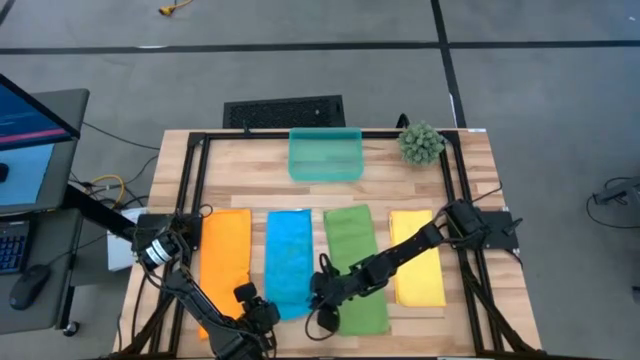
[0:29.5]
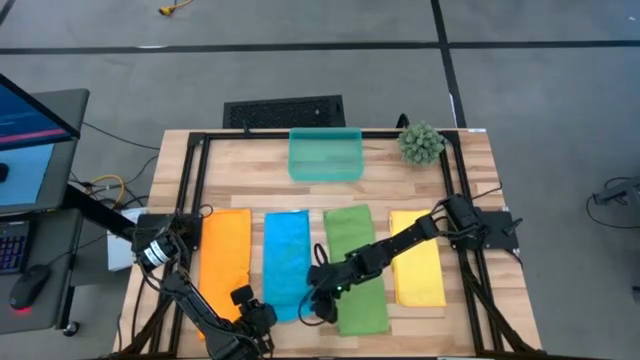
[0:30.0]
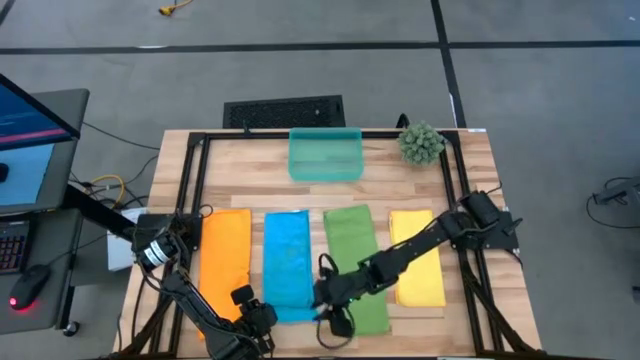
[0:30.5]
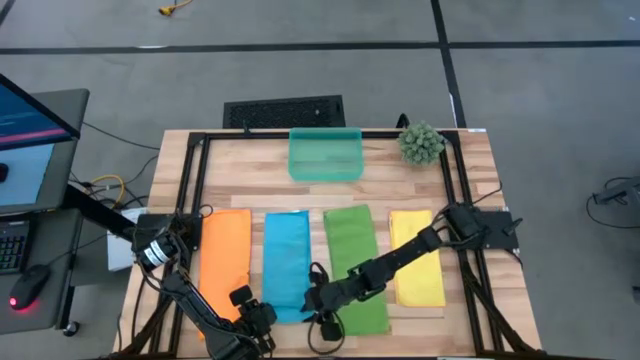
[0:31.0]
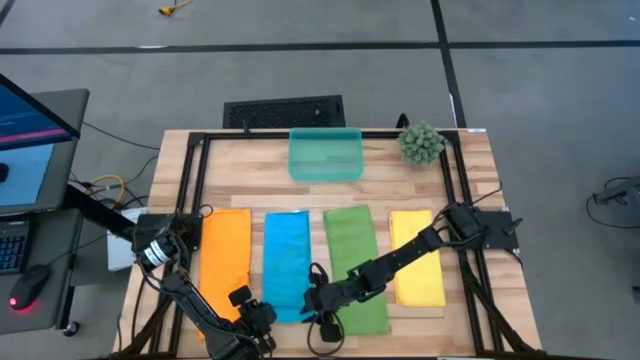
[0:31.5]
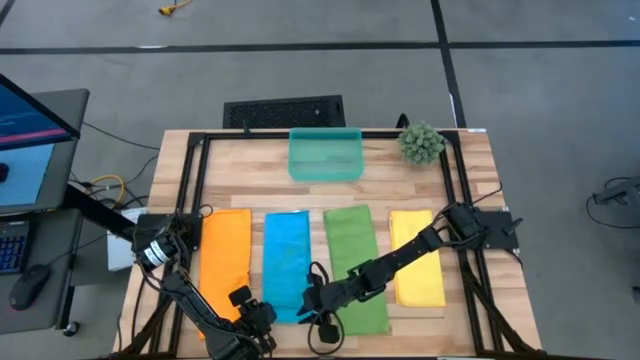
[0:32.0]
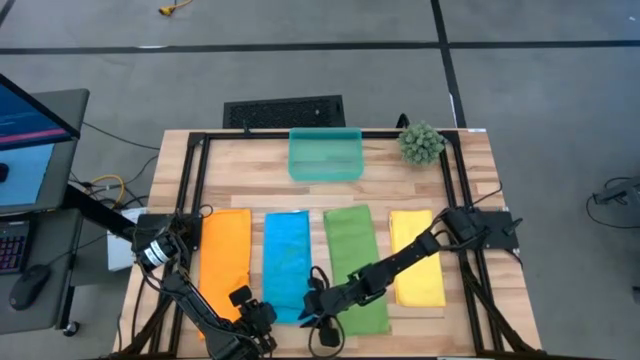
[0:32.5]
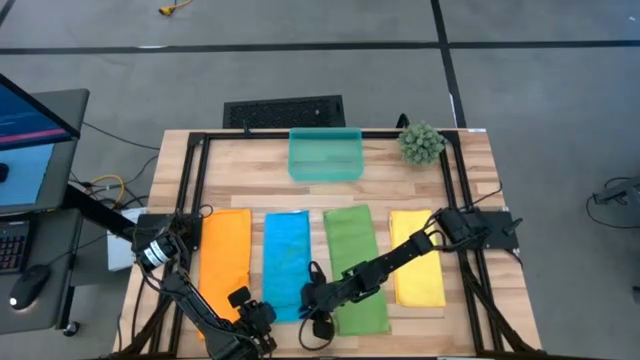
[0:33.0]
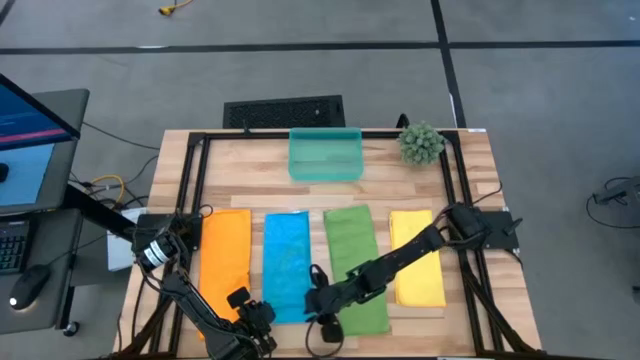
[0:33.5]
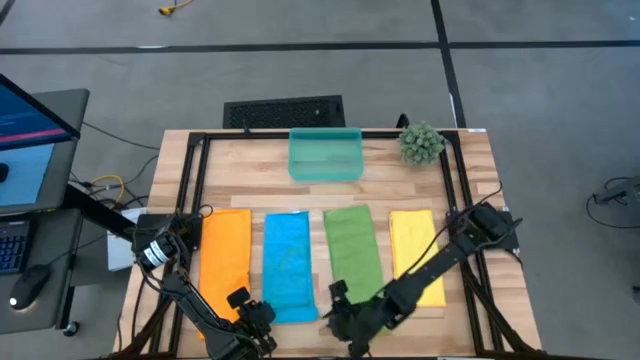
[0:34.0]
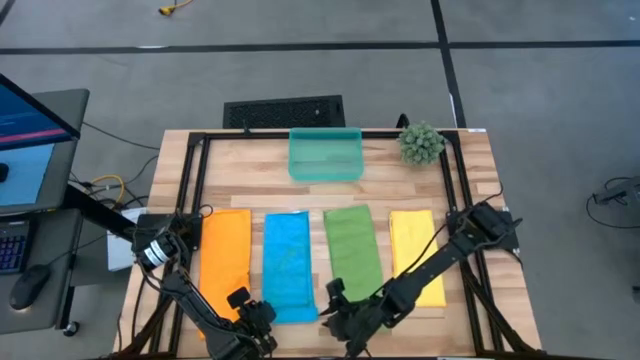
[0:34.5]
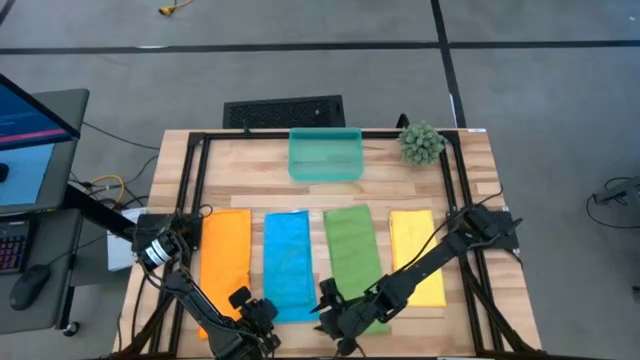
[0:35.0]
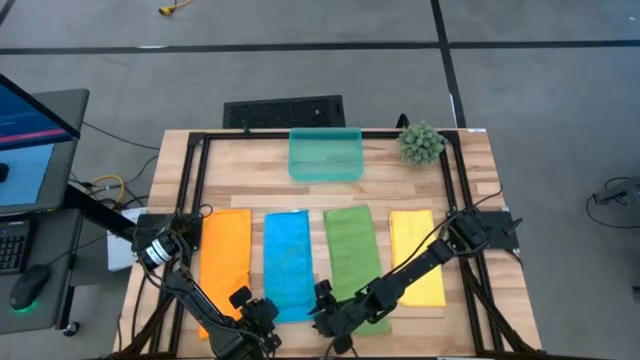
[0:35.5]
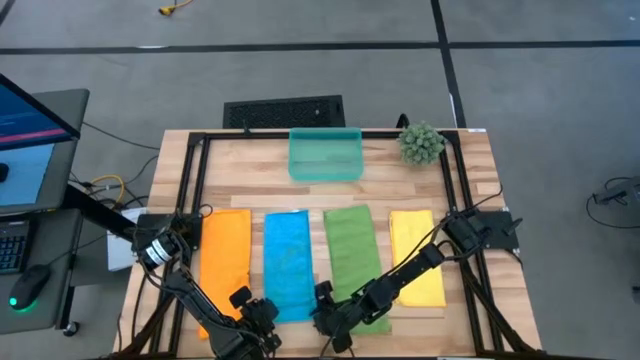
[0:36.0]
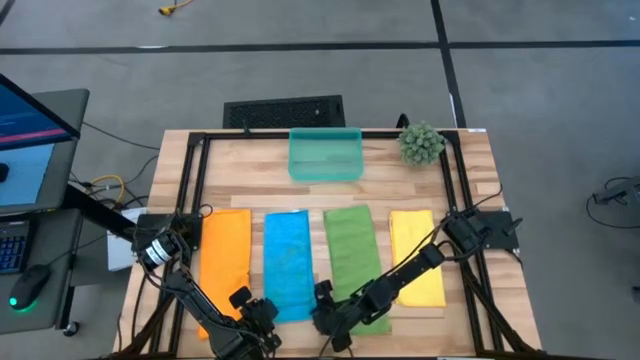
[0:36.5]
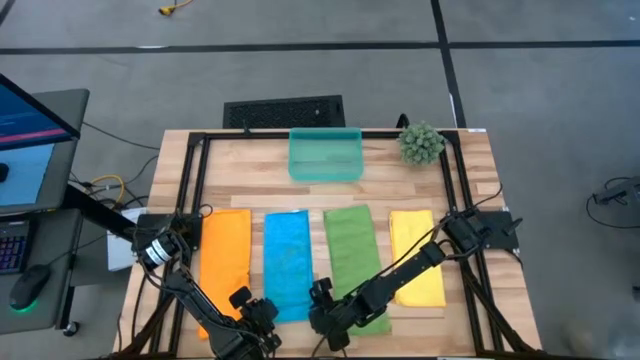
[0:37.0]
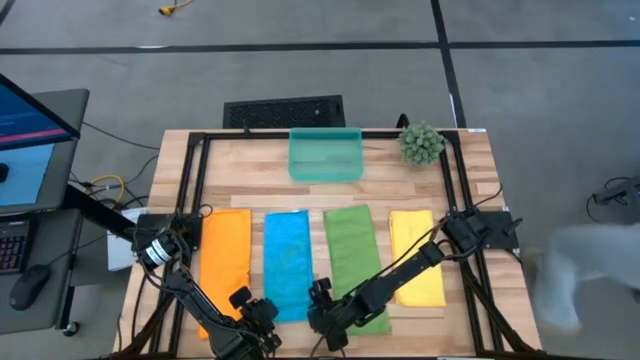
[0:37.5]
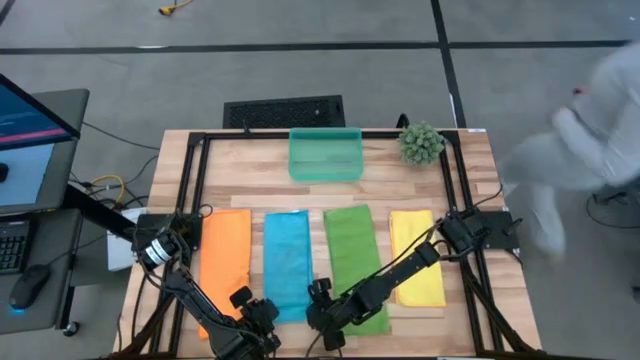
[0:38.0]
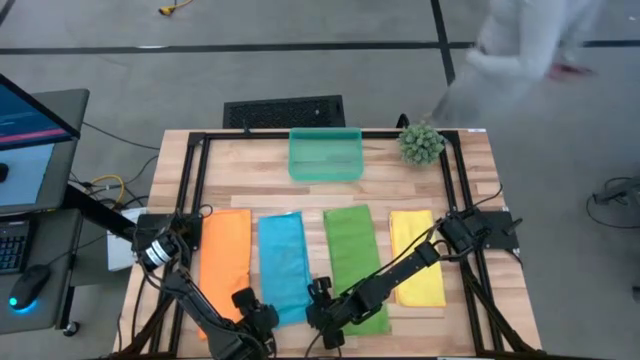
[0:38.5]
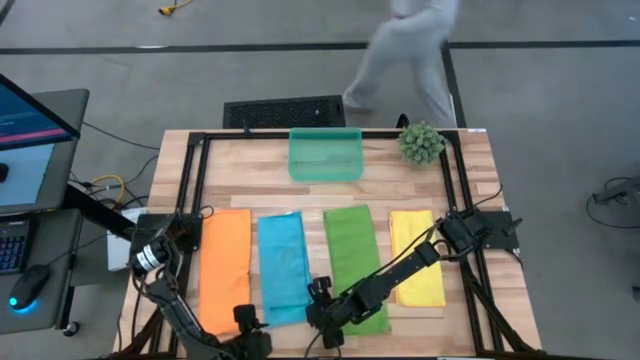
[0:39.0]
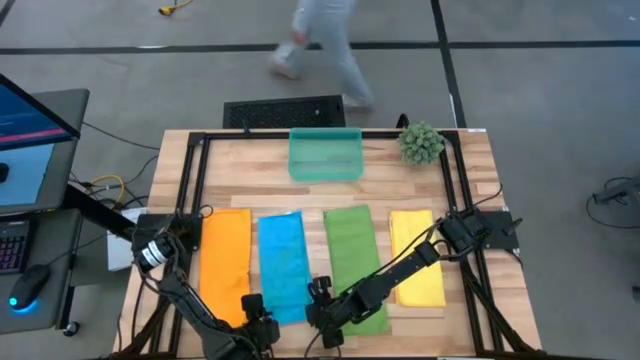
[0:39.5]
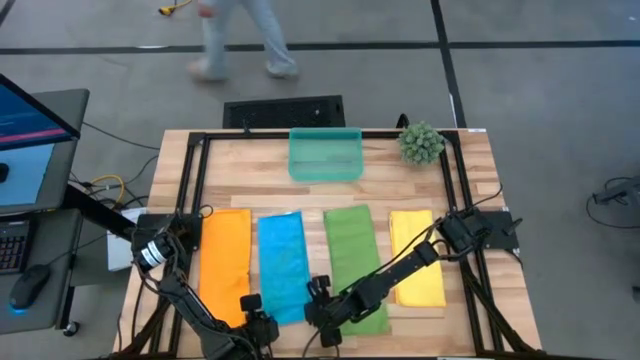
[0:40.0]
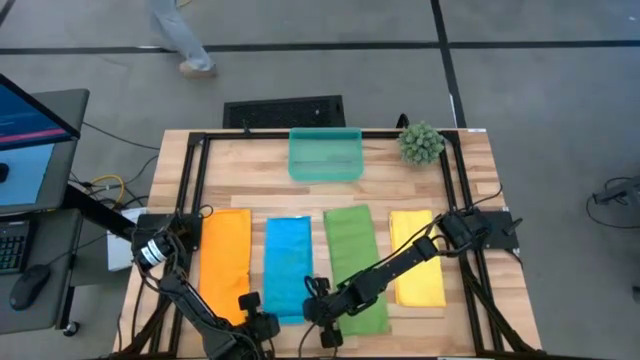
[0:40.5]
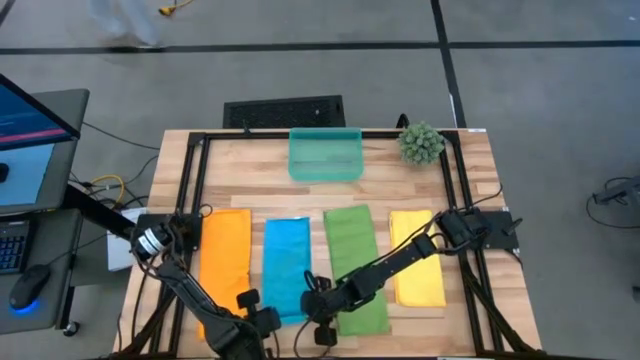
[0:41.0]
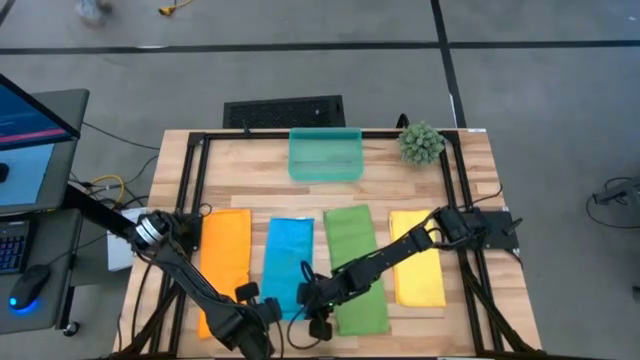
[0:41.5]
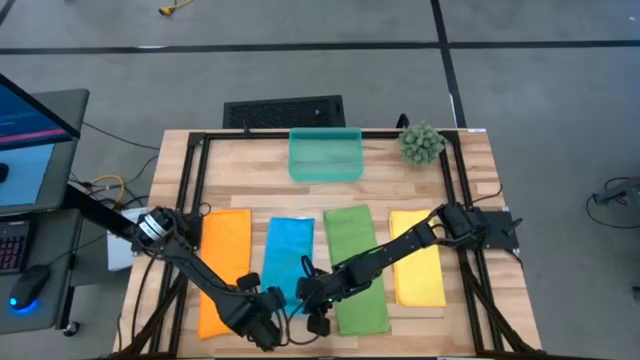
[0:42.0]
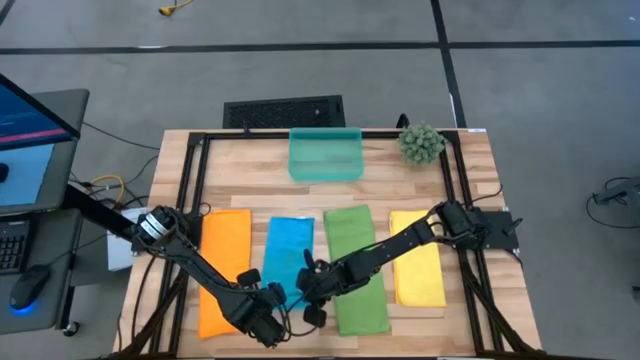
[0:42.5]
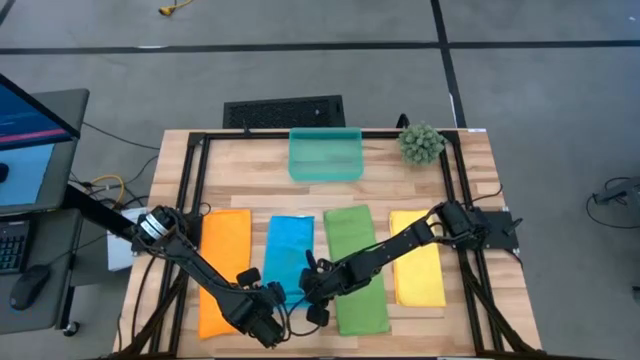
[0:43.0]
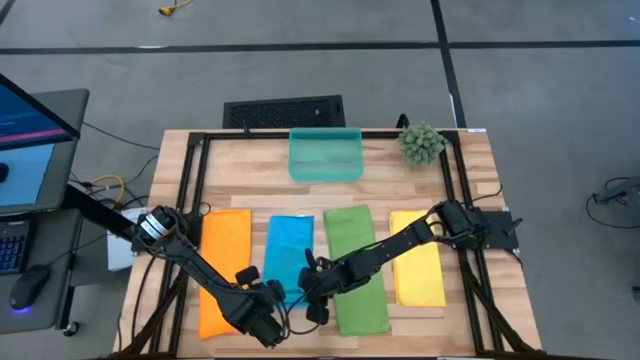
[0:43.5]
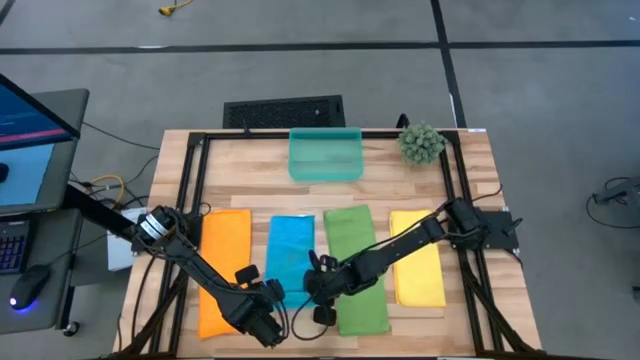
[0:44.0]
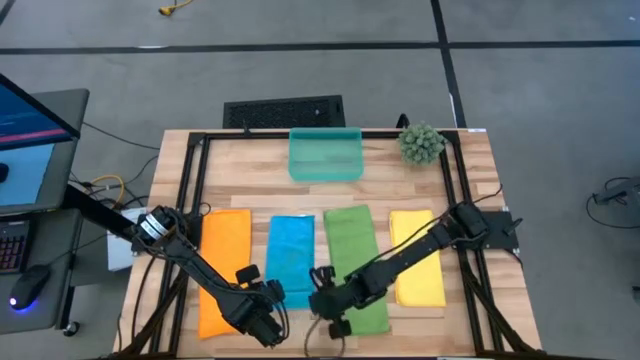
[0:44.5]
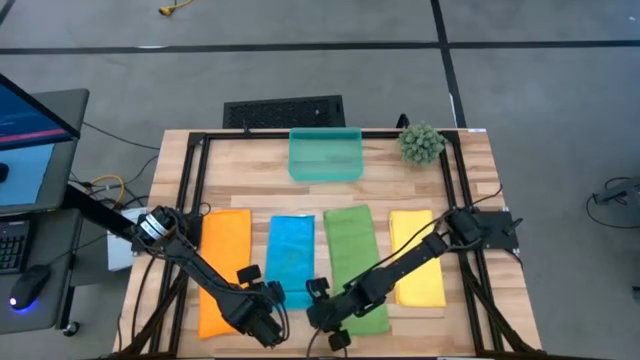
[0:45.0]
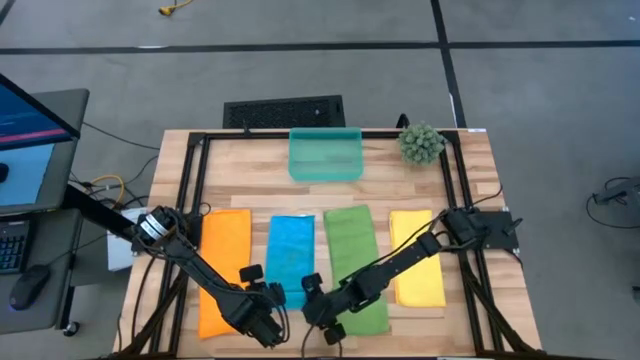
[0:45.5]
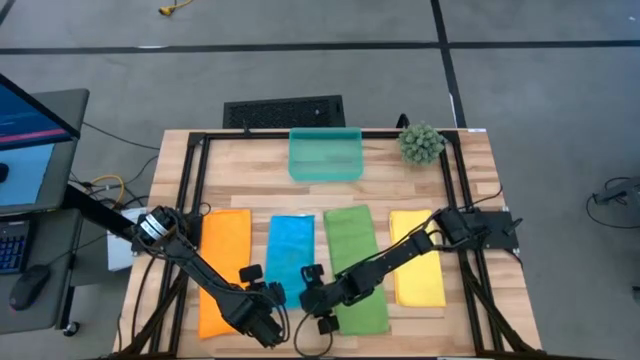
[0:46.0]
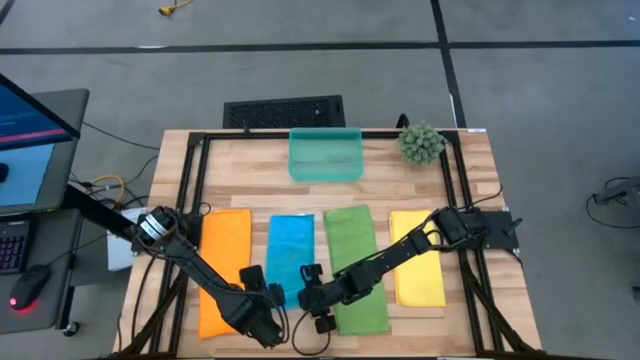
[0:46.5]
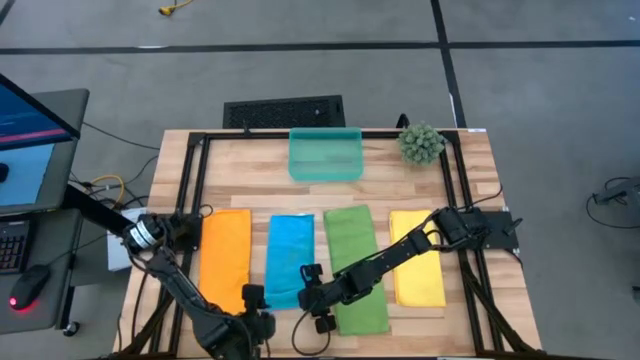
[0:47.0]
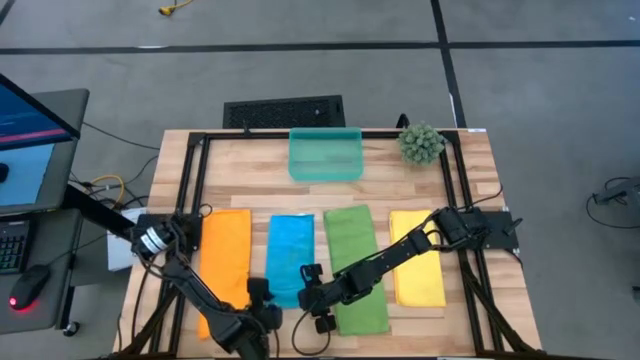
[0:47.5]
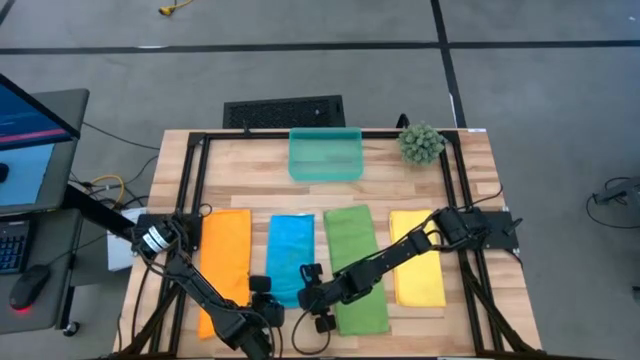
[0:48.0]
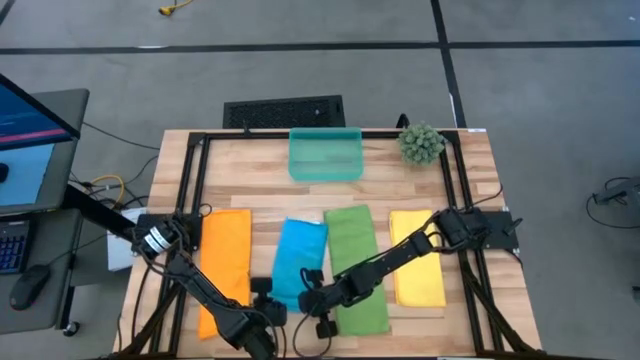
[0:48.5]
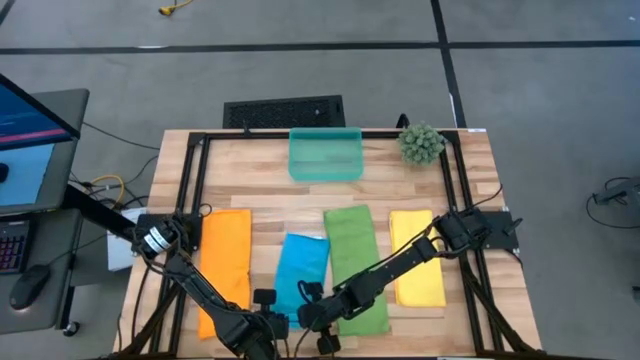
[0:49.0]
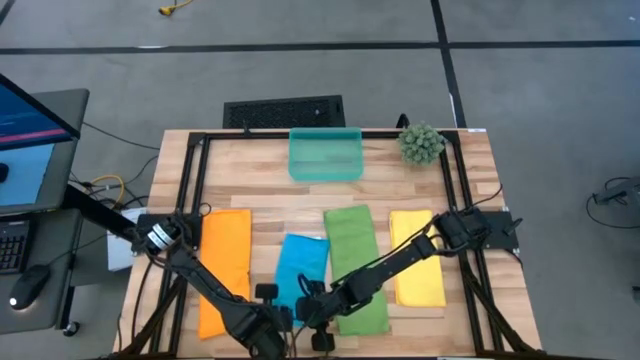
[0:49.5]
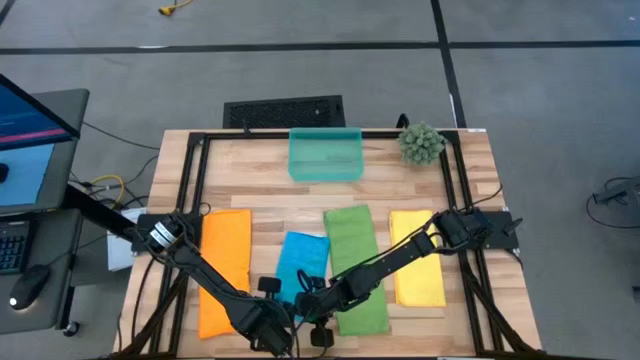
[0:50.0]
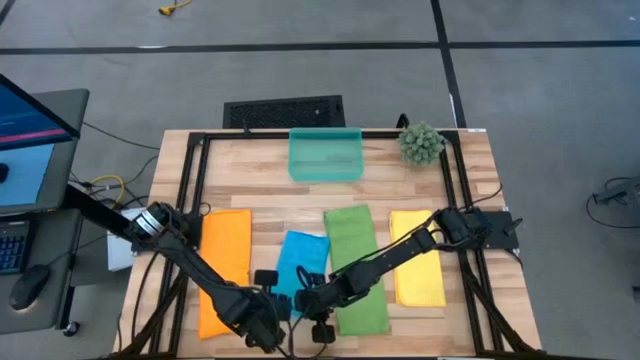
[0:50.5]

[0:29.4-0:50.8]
Task: Roll microfiber towels into tight, uniform cylinder then place into a basket
Roll the blue towel
